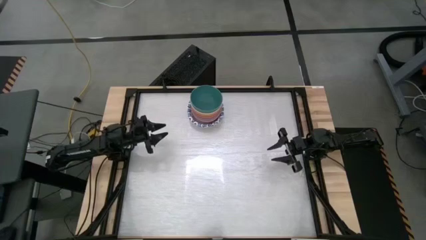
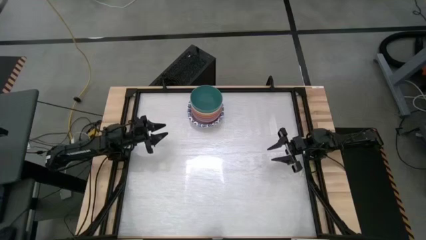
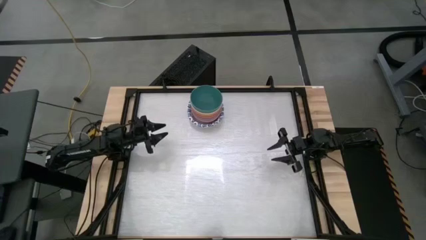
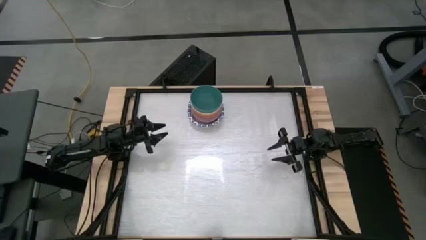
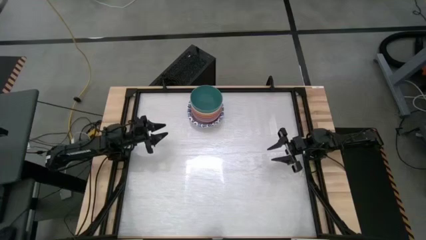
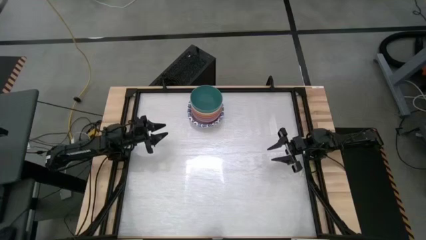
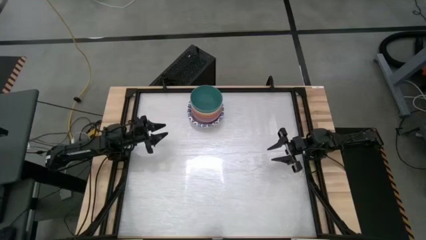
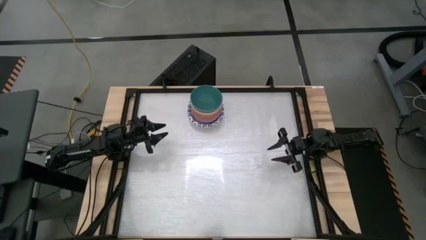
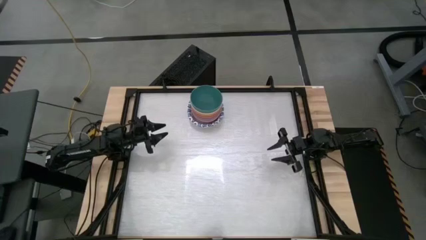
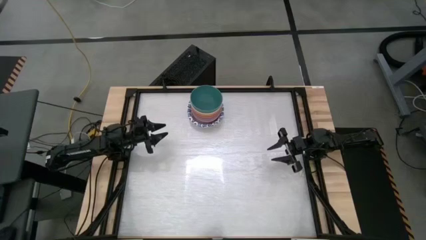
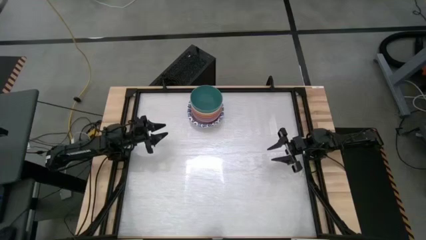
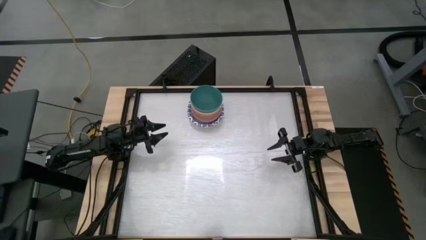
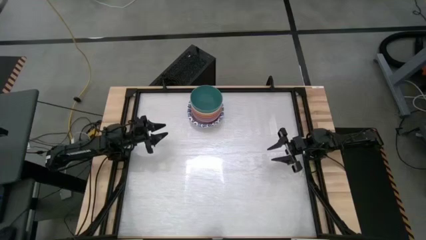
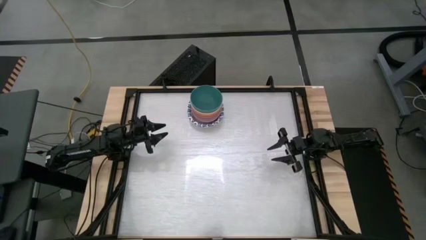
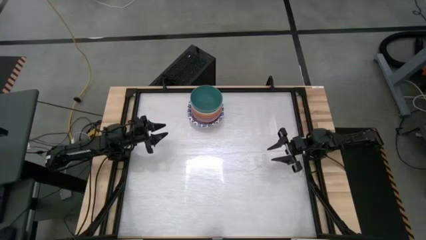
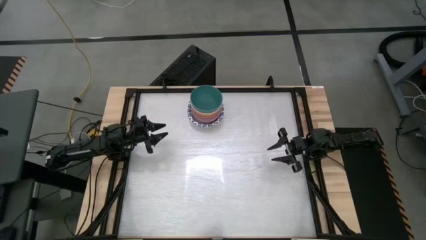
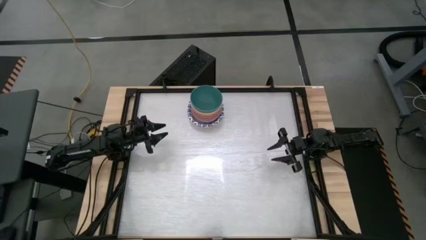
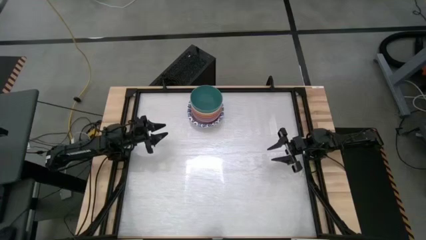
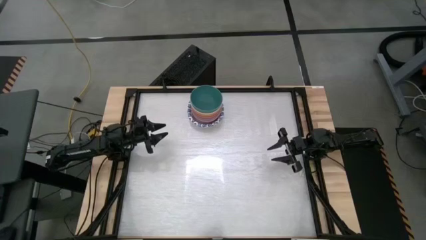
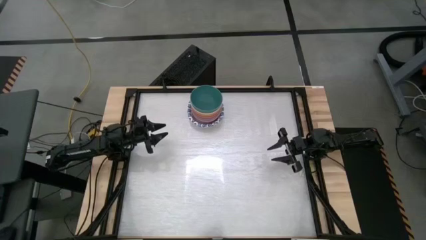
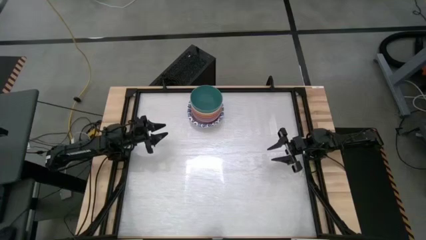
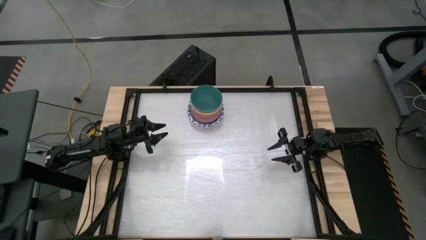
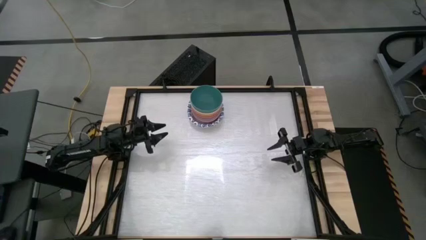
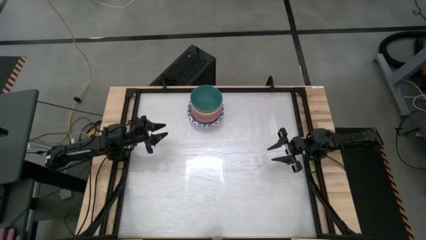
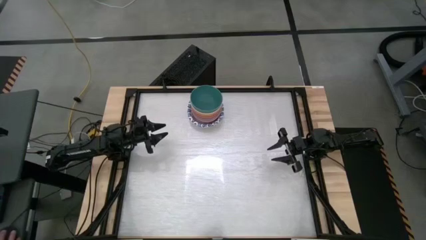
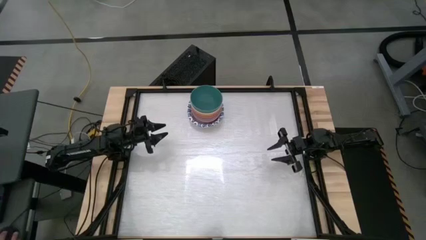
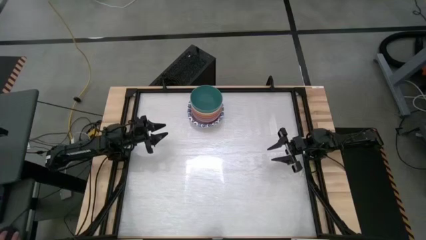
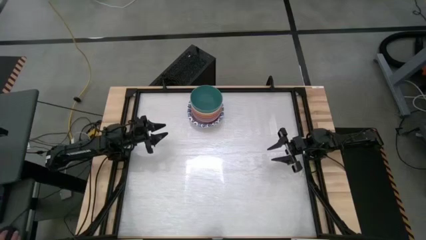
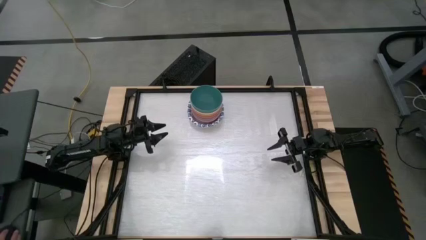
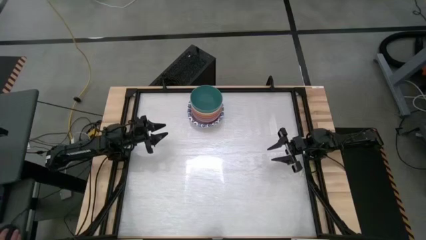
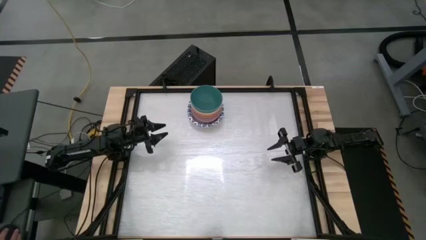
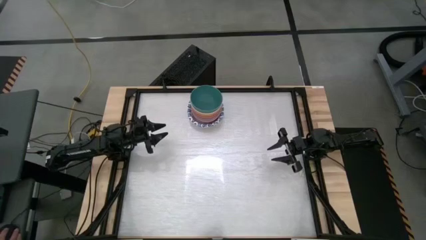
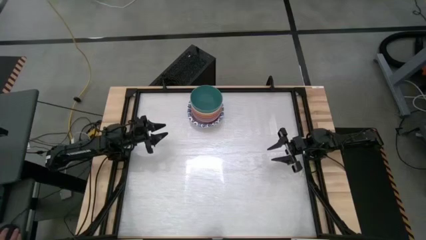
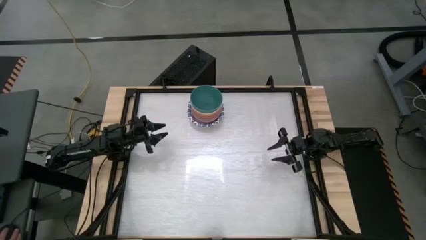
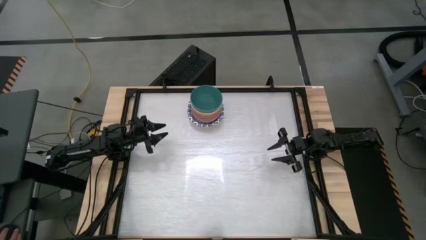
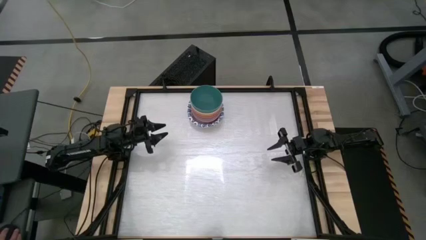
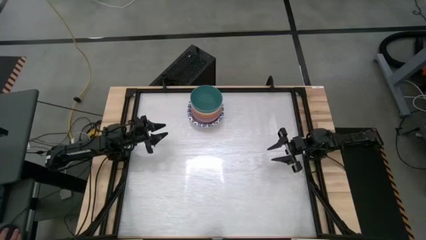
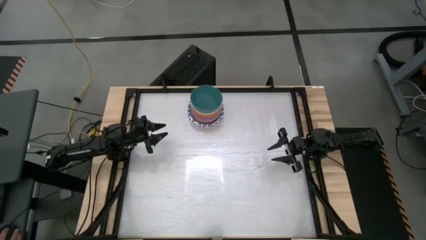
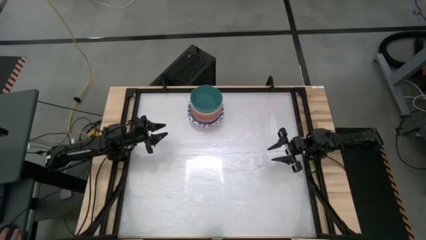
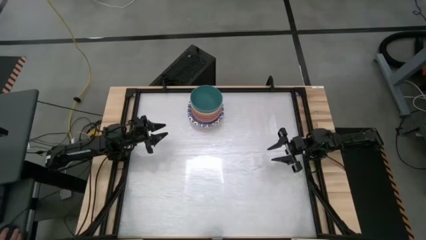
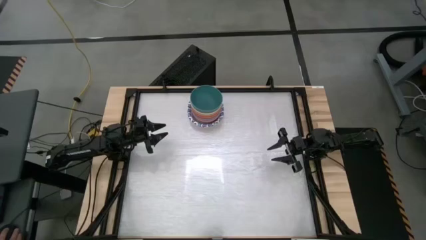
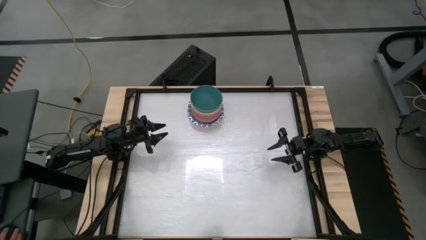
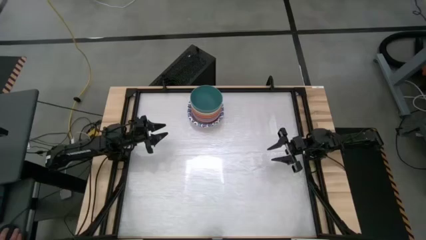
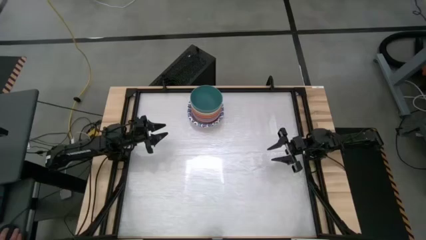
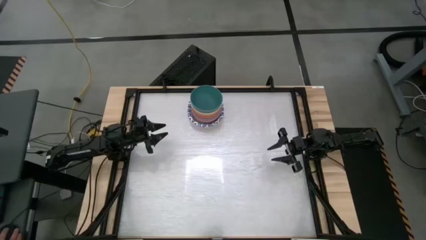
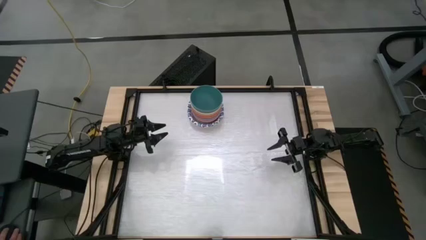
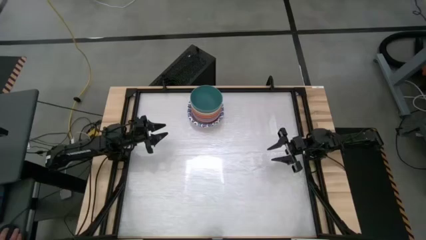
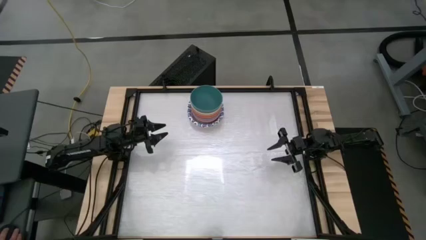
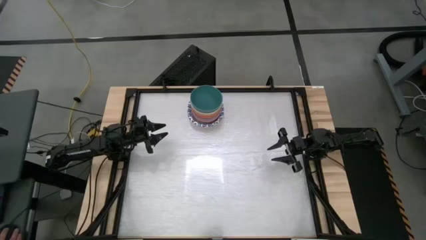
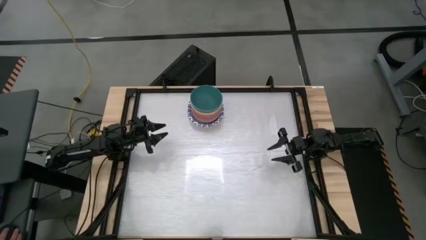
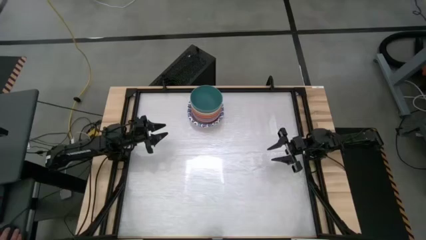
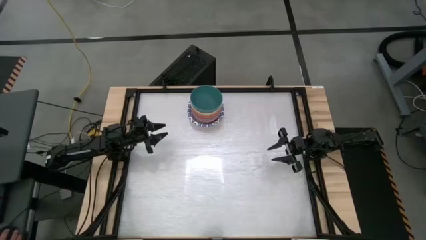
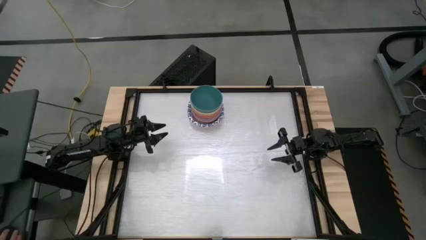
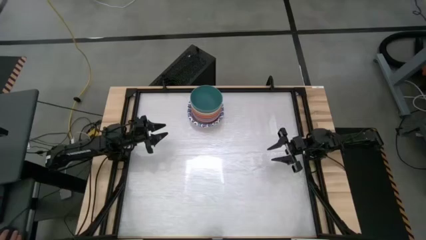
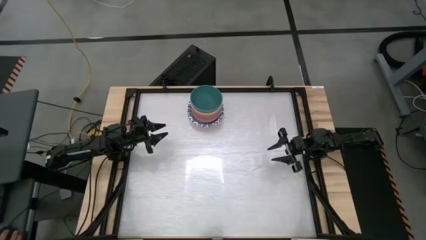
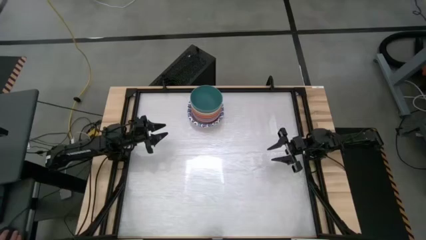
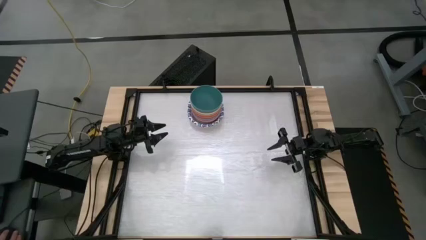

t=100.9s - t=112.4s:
Return to Home Position

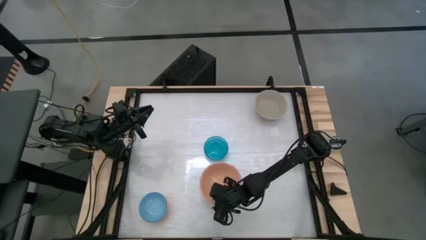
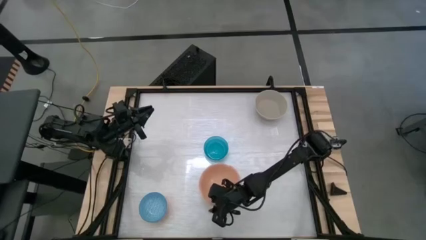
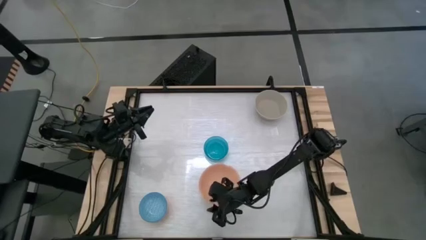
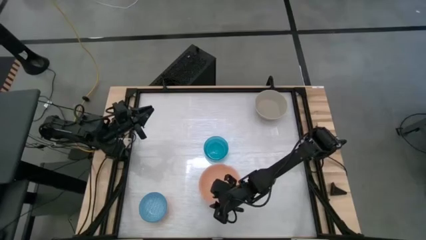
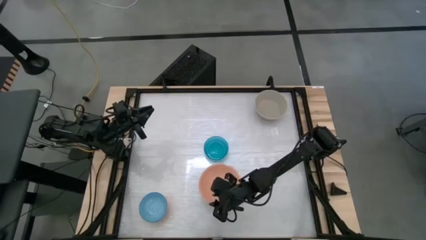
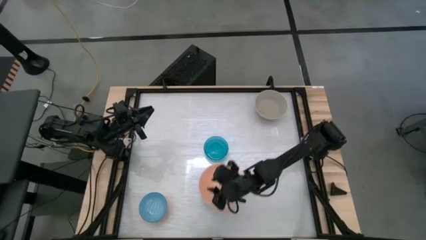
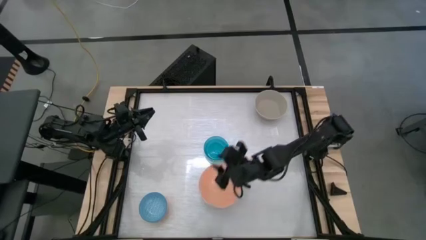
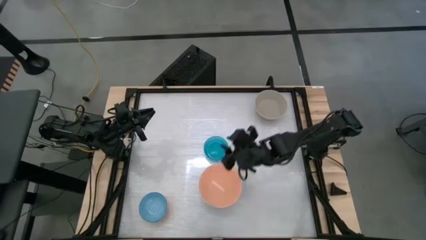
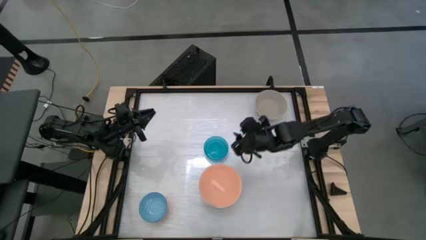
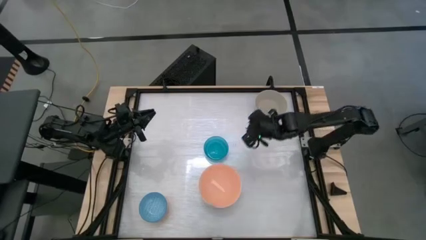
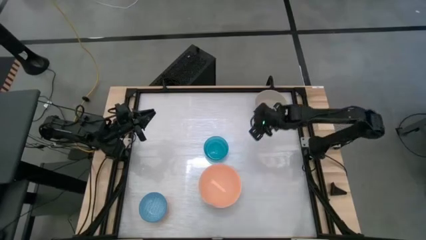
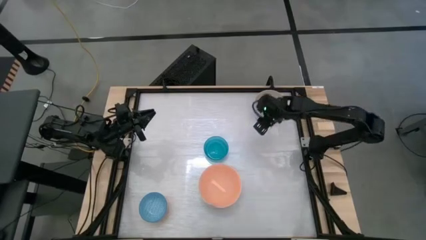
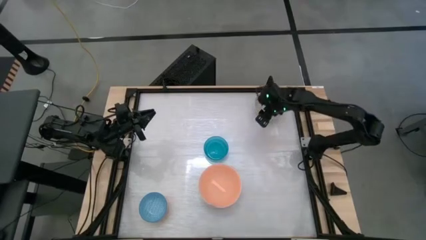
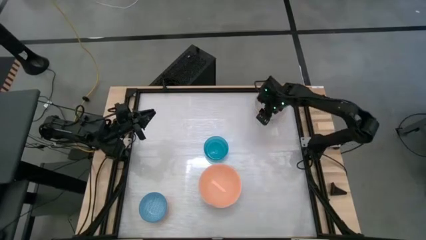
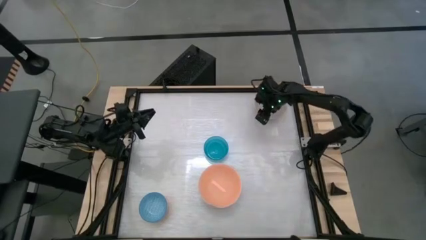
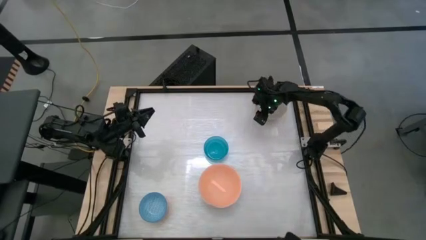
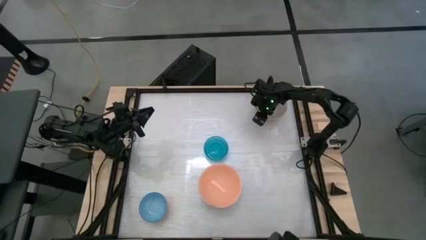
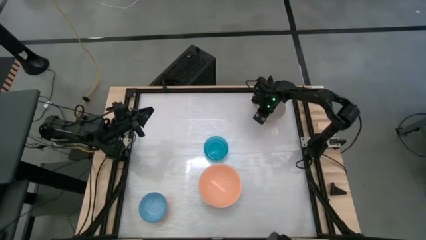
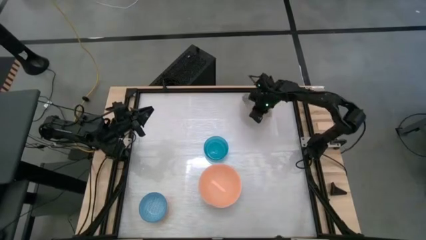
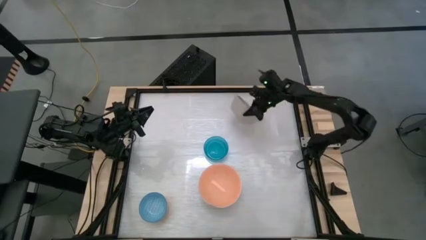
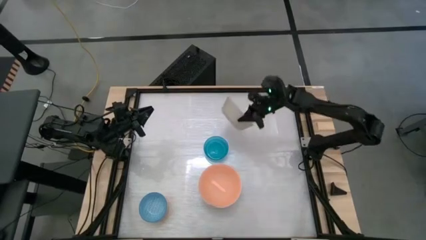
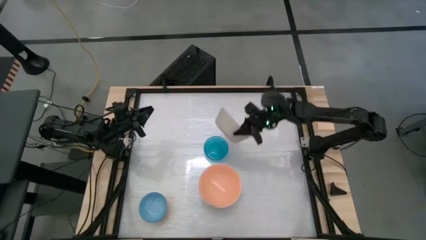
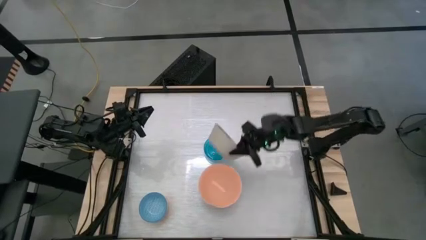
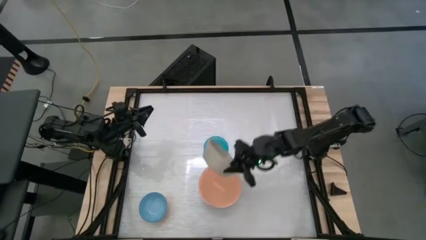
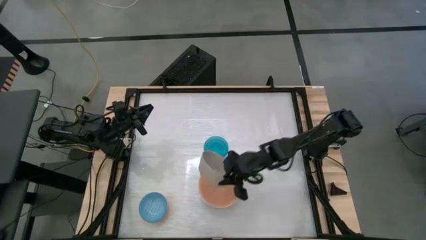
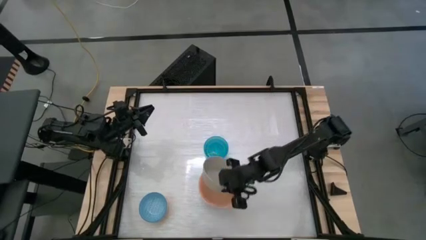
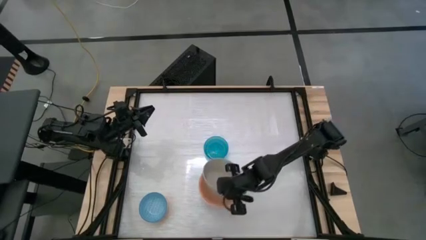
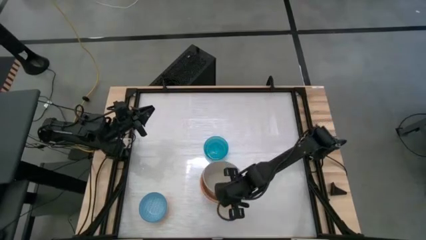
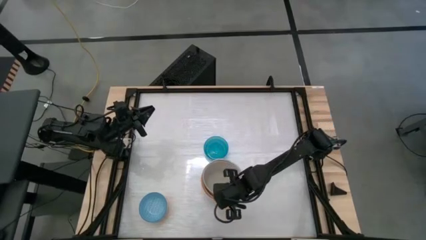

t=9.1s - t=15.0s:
Stack the gray bowl on top of the orange bowl
